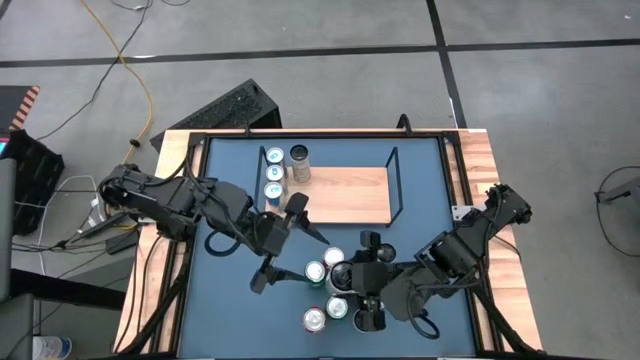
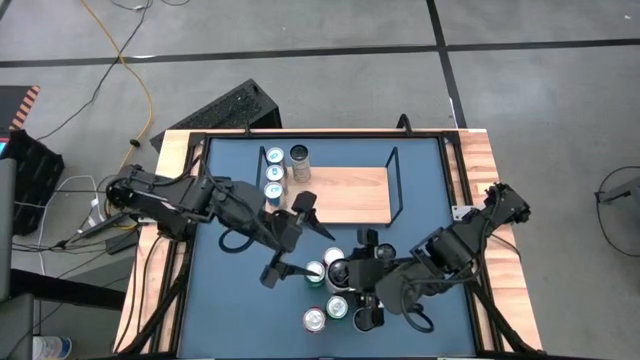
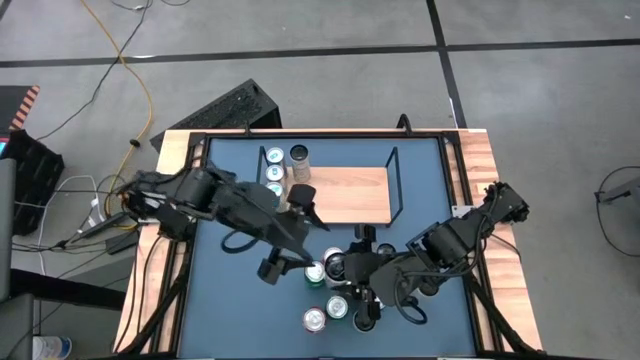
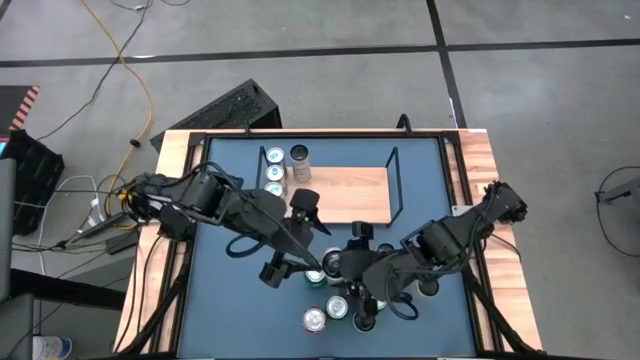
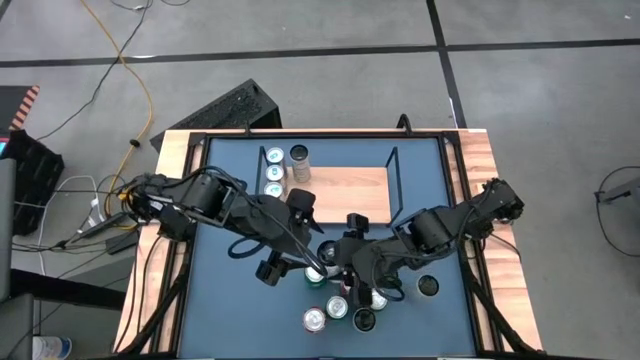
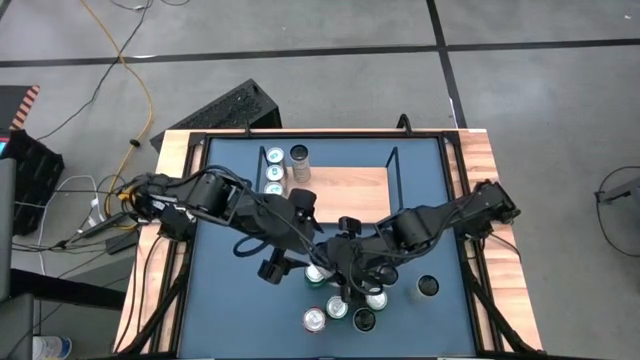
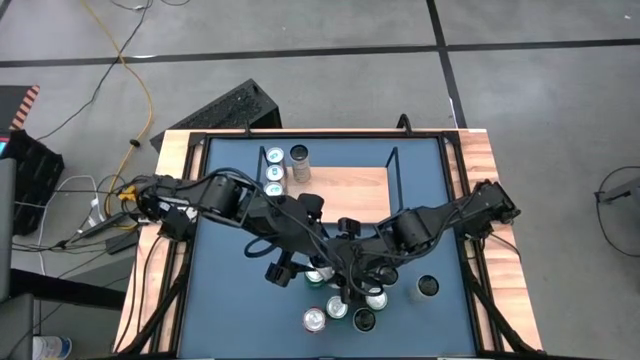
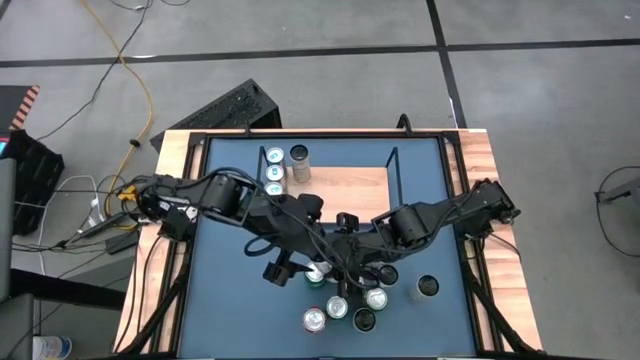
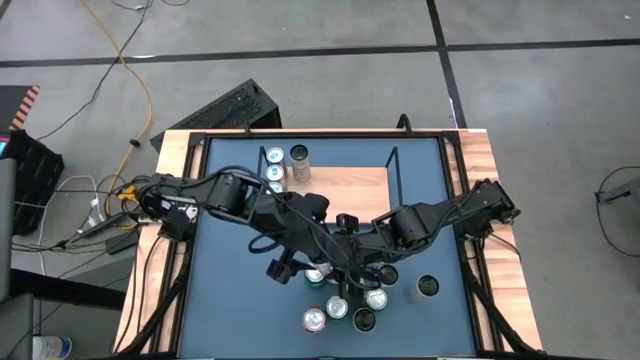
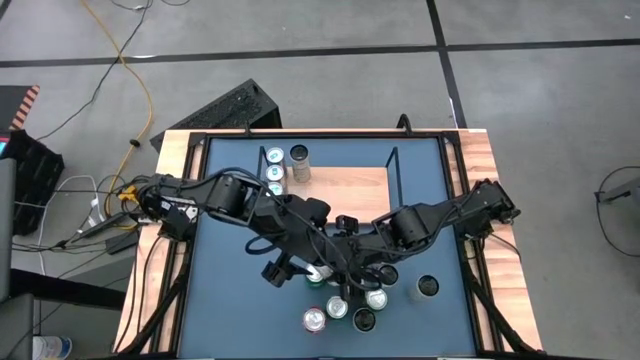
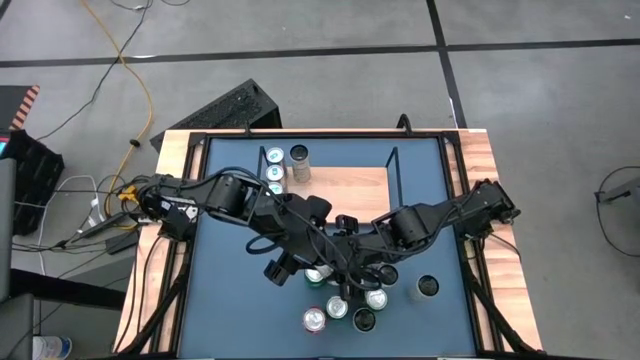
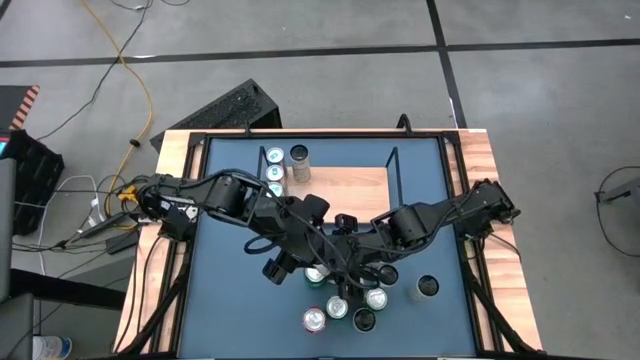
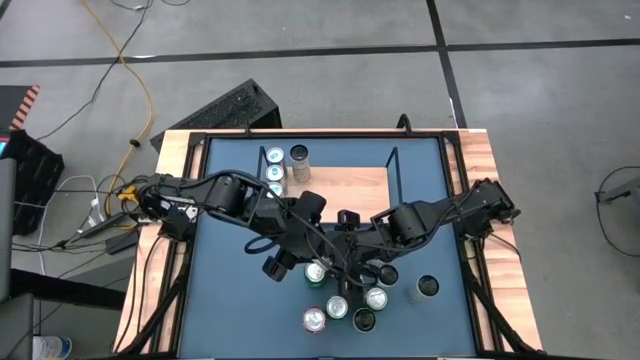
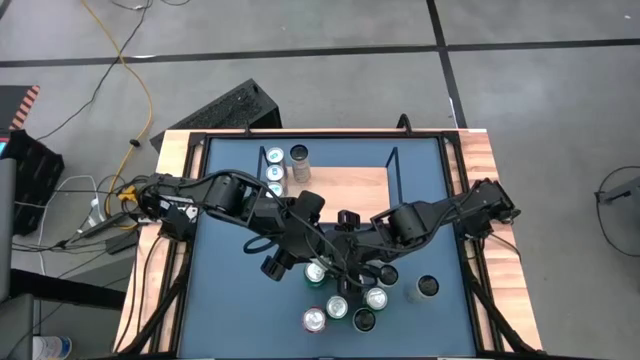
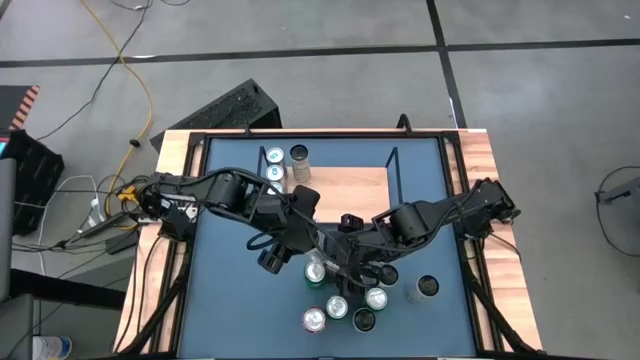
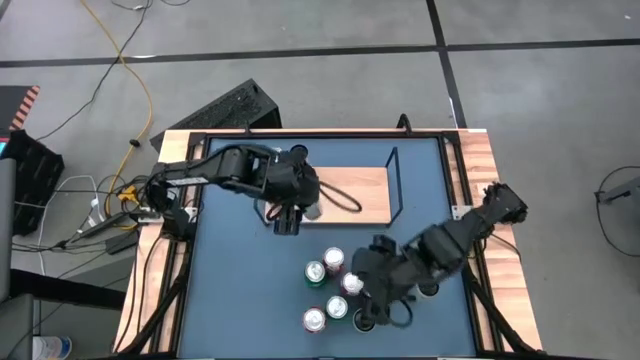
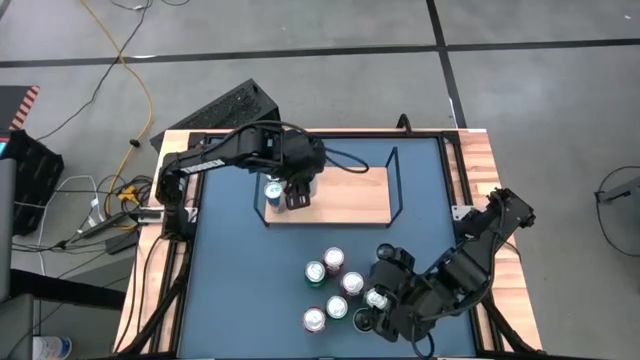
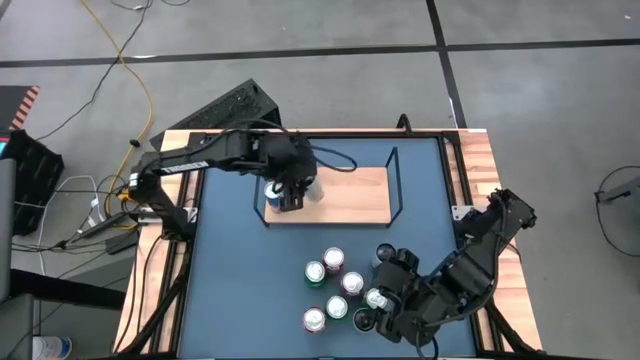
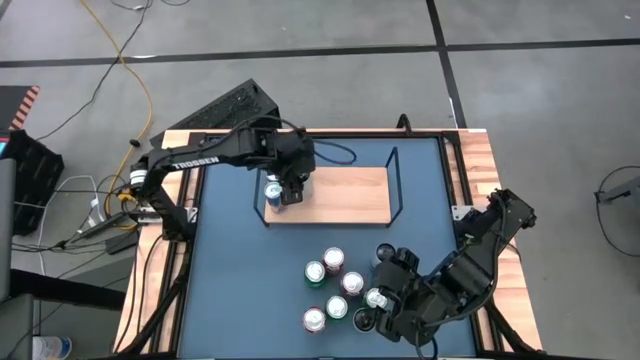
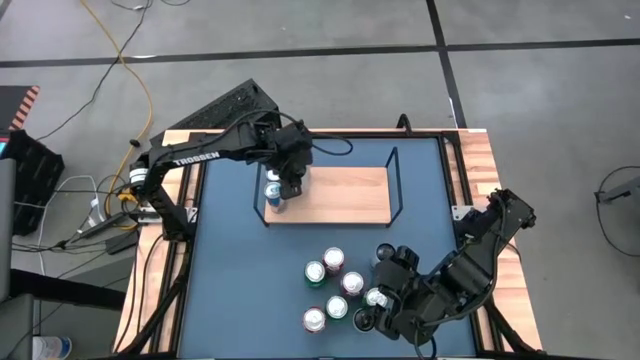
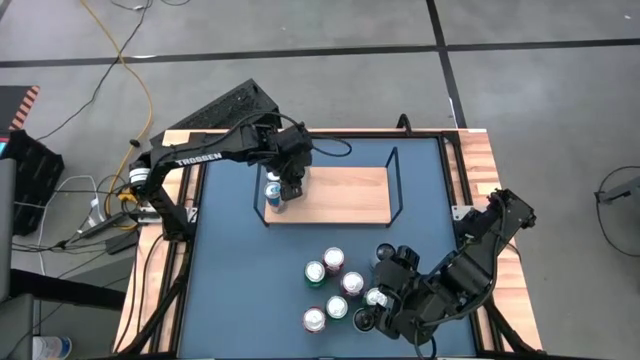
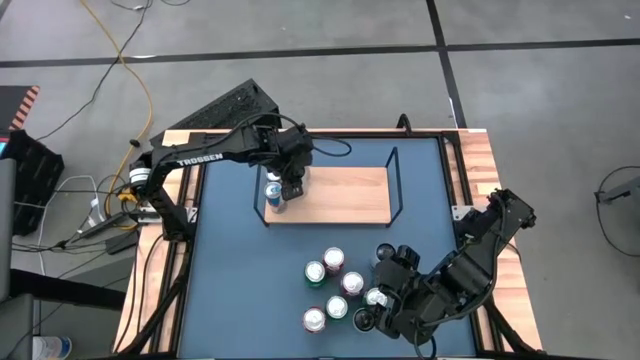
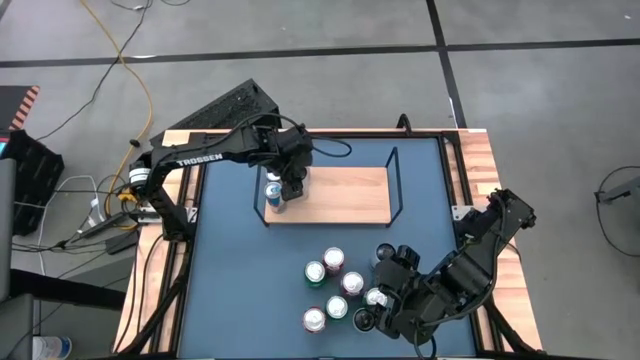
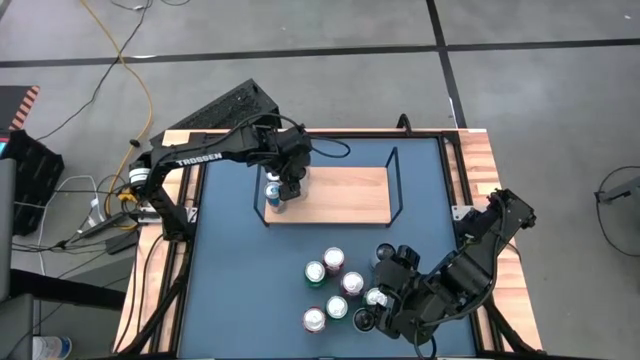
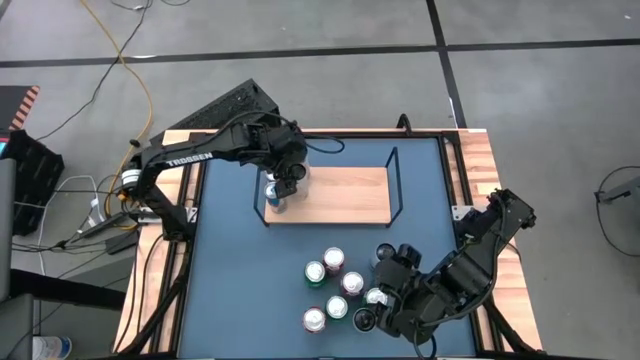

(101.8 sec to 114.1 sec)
Task: Place canned beverage on shelf
Put the bottom white and orange soda can on the shelf aligned with the other white and orange soda can
